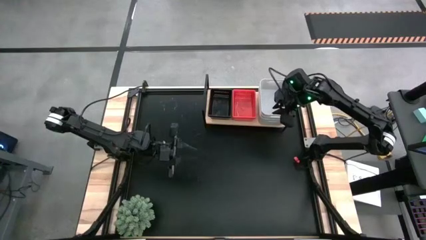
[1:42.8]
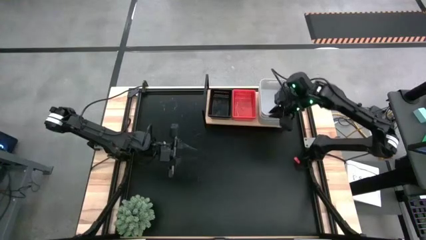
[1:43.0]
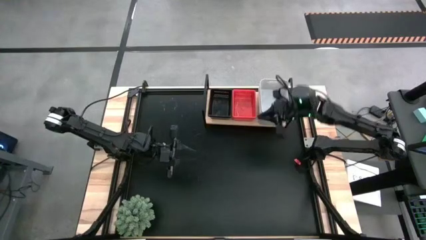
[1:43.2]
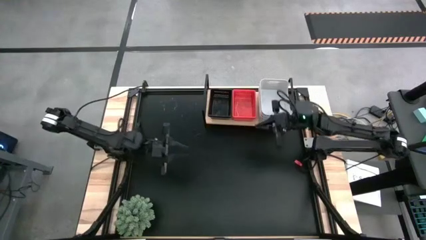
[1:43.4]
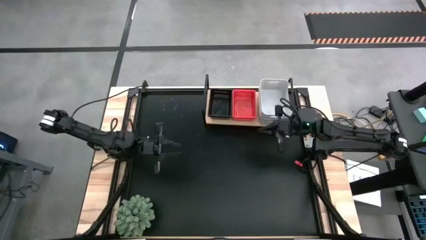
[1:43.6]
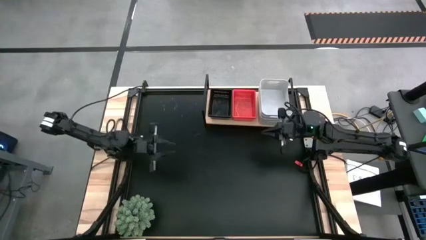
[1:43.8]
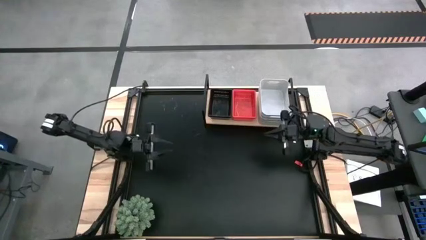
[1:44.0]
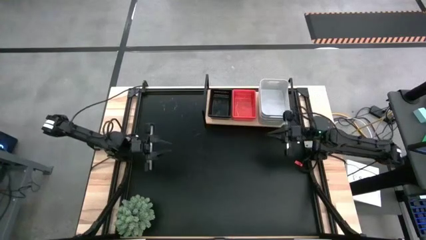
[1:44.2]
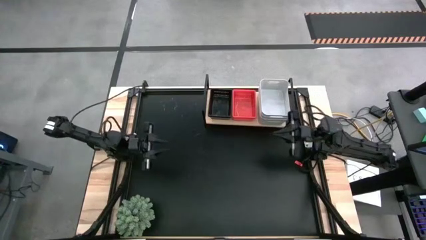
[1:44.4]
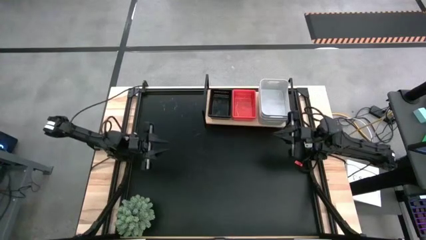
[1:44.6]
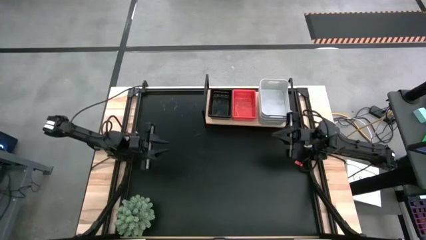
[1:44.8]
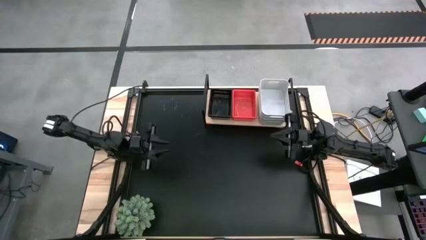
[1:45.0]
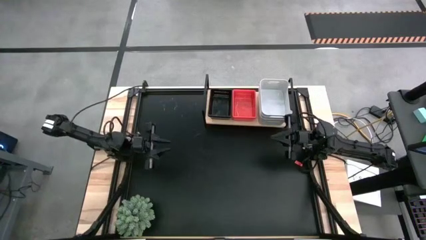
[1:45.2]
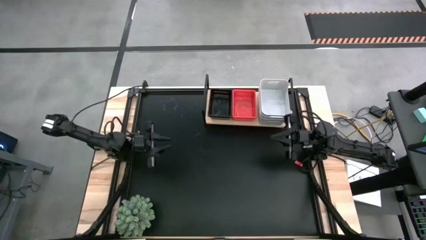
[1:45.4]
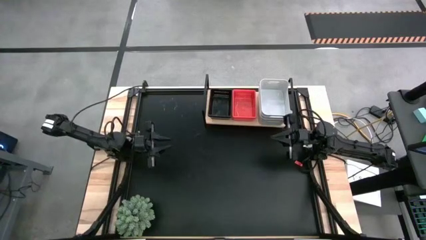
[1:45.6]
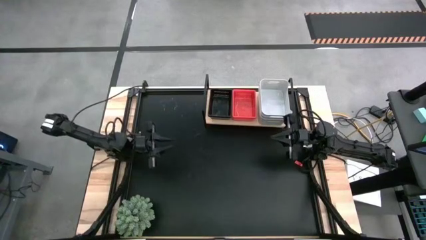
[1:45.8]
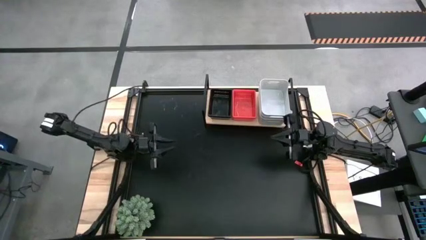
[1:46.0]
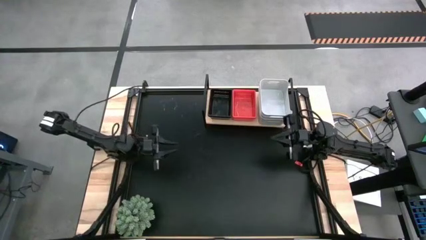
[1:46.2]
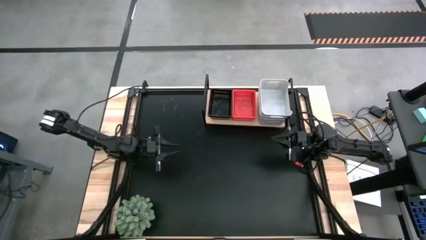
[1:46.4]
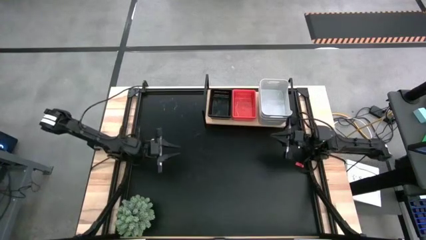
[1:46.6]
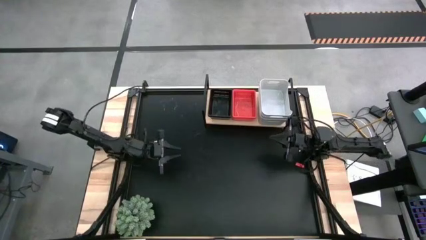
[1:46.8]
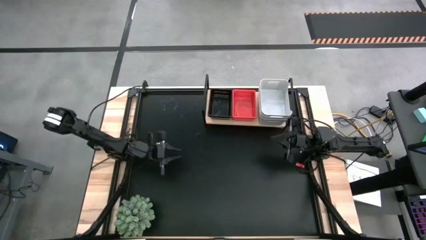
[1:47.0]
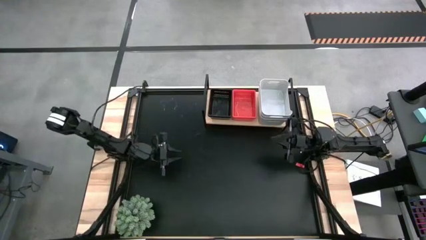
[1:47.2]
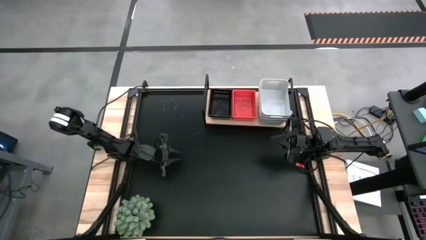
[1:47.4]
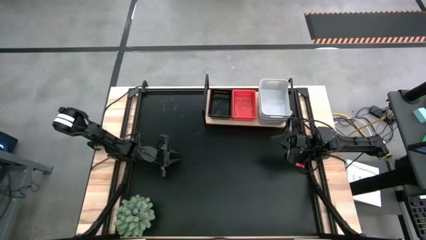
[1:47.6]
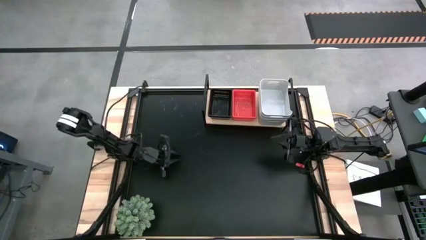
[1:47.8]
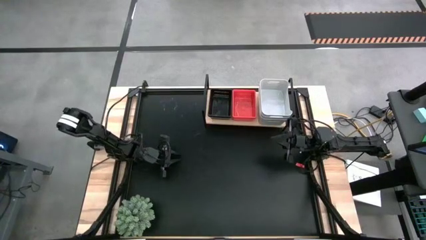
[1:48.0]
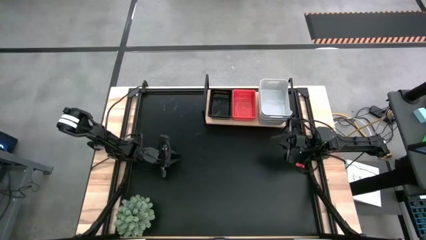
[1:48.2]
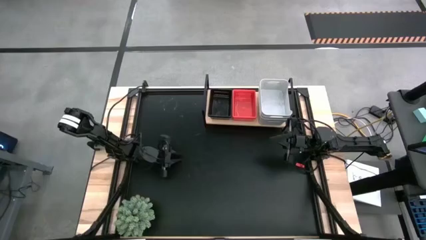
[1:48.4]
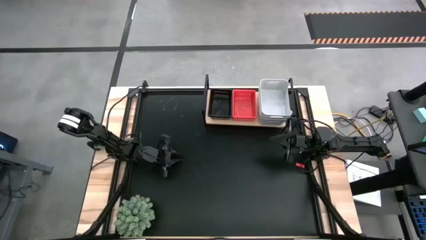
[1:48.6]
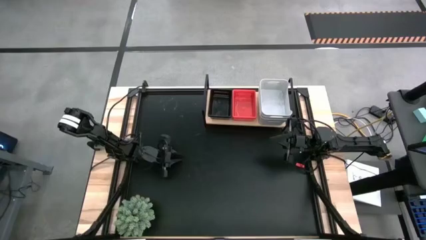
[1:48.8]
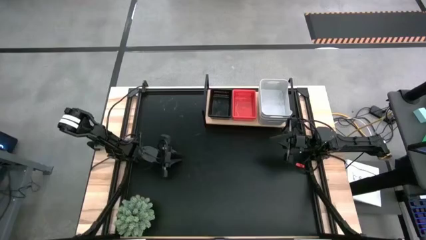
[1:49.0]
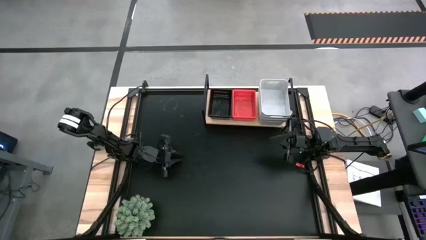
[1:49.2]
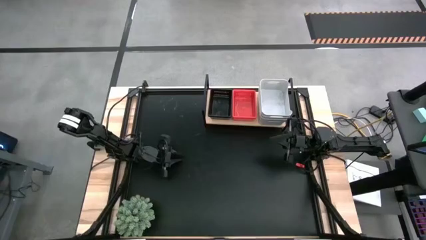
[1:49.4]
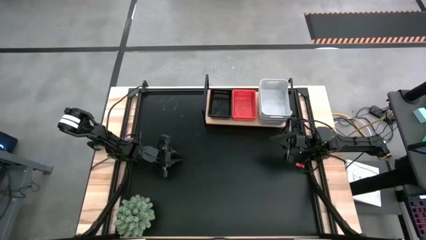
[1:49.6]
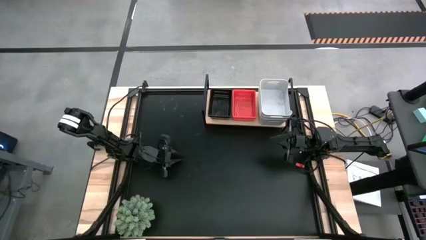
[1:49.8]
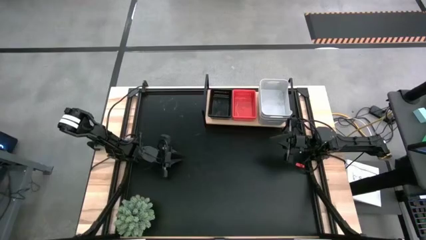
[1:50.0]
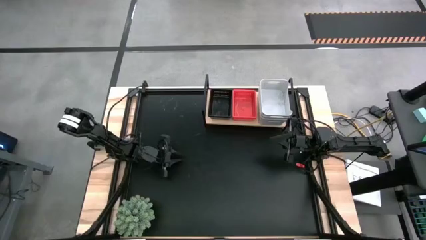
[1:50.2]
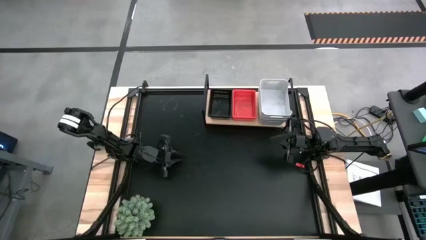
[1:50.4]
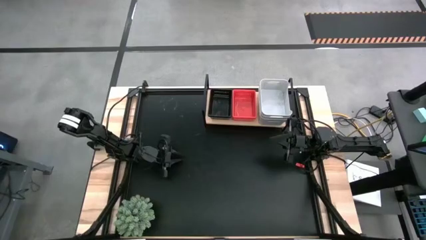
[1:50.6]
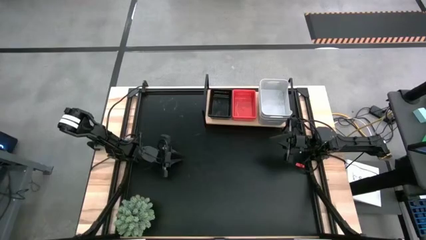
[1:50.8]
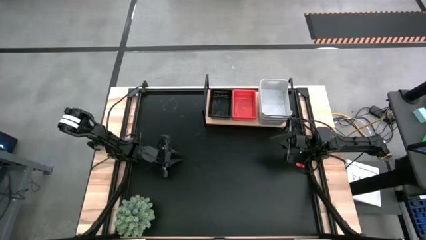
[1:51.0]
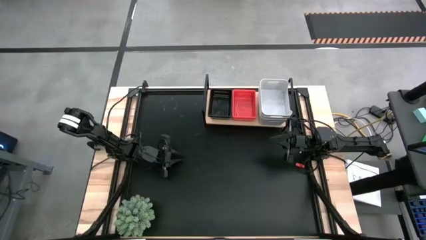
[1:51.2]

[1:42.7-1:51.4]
Task: Stack baskets on shelf by color
Return to Home Position

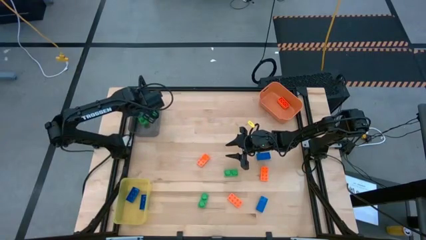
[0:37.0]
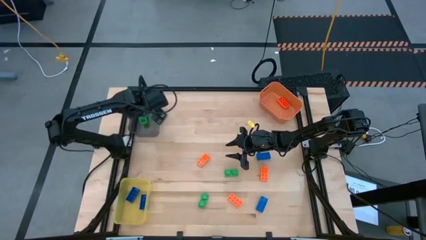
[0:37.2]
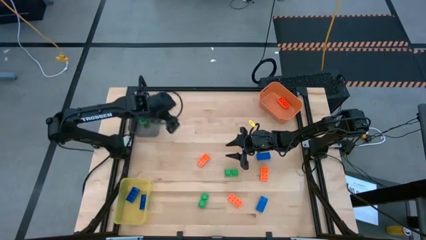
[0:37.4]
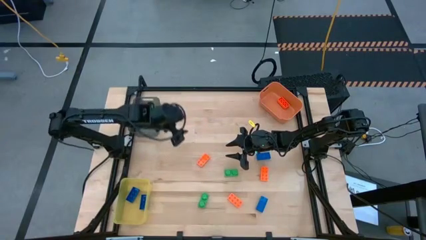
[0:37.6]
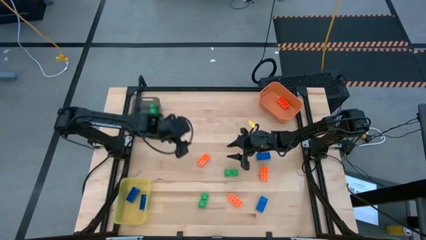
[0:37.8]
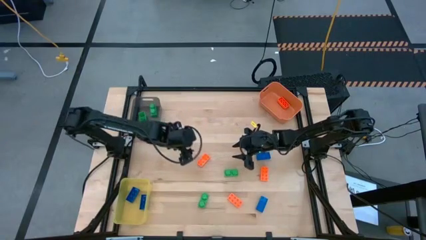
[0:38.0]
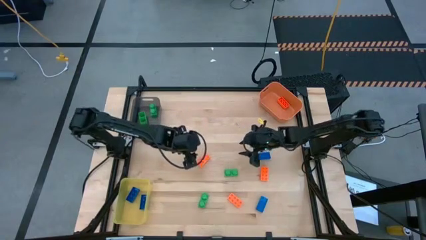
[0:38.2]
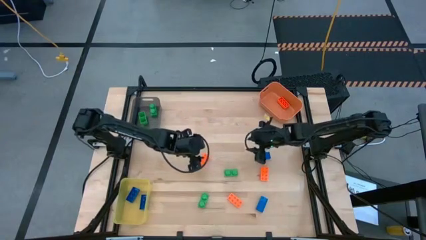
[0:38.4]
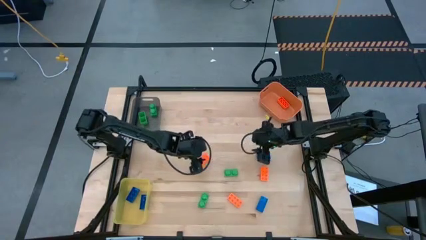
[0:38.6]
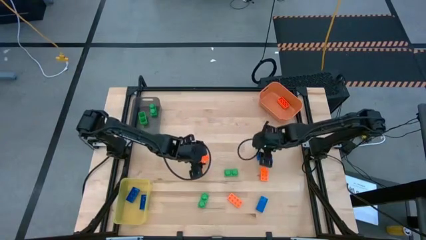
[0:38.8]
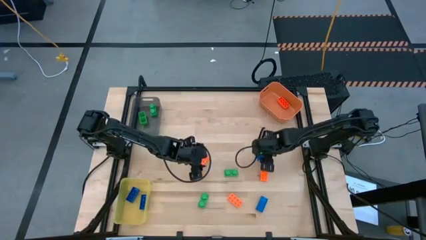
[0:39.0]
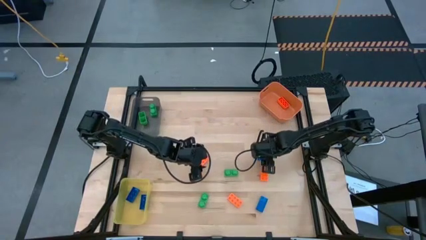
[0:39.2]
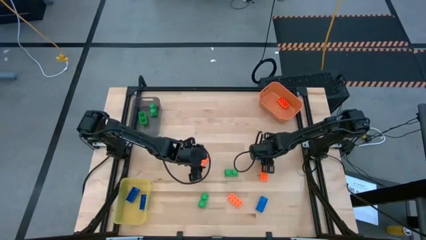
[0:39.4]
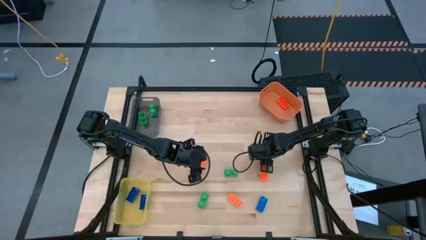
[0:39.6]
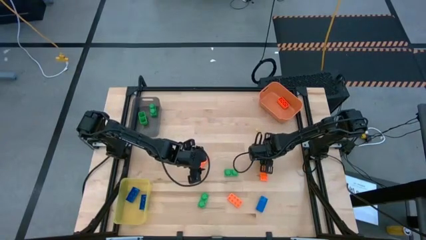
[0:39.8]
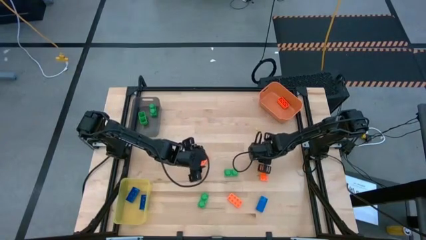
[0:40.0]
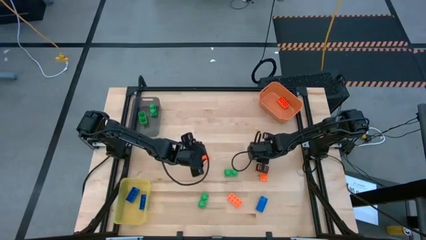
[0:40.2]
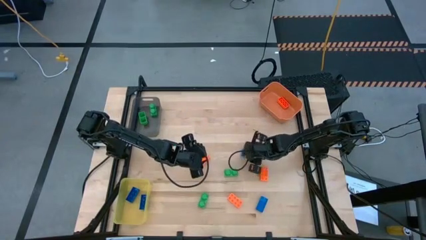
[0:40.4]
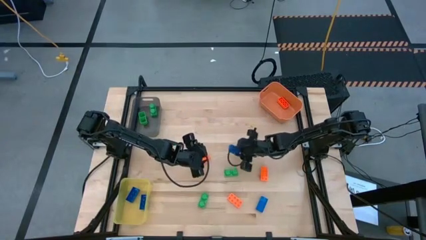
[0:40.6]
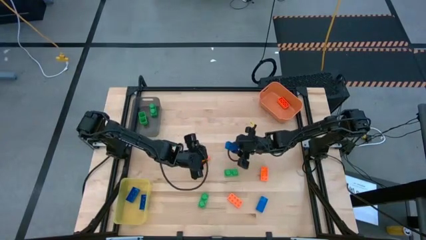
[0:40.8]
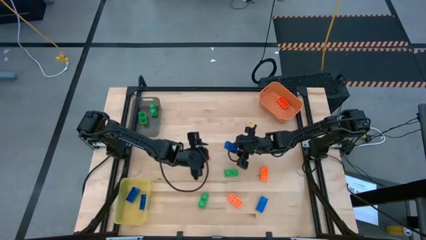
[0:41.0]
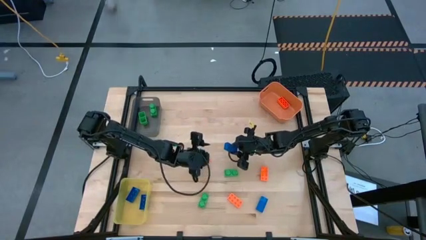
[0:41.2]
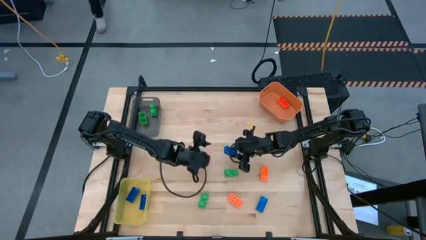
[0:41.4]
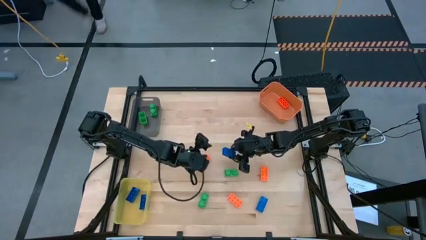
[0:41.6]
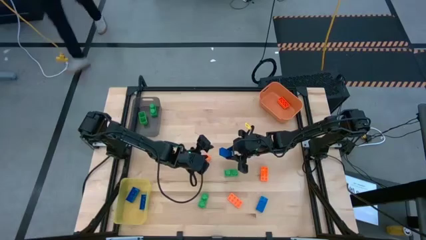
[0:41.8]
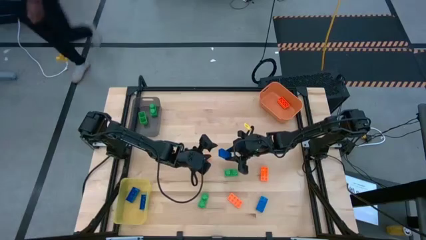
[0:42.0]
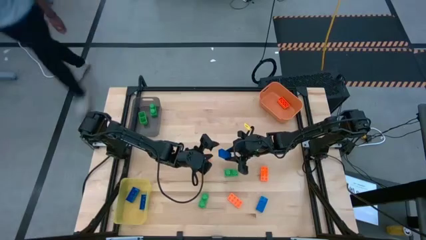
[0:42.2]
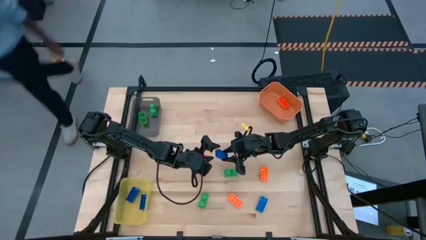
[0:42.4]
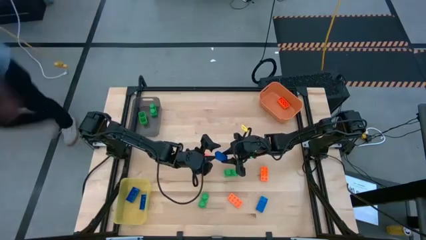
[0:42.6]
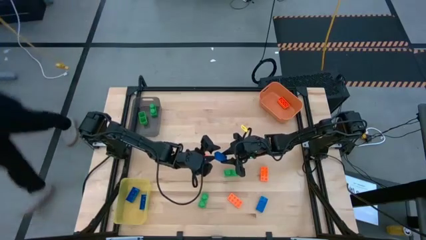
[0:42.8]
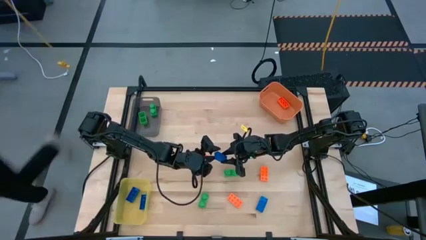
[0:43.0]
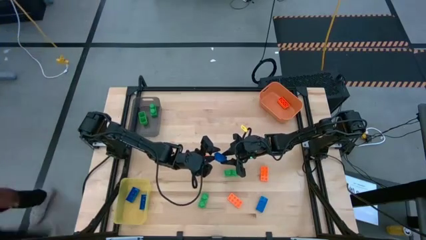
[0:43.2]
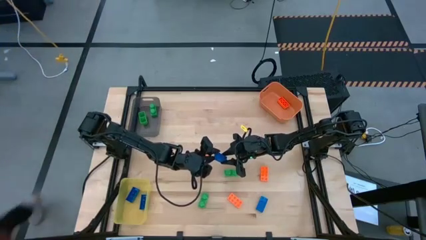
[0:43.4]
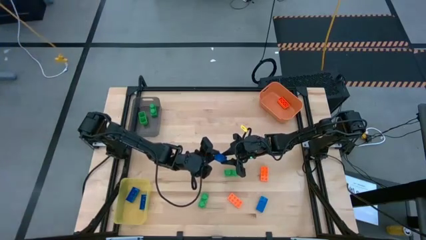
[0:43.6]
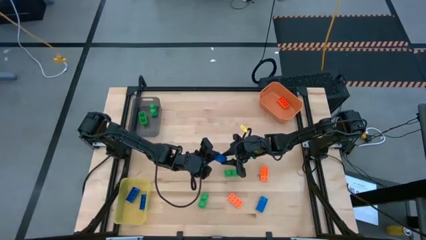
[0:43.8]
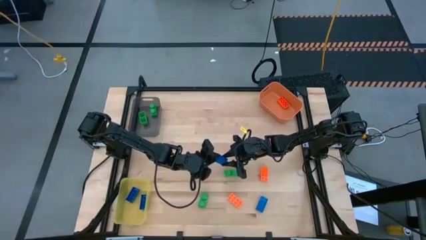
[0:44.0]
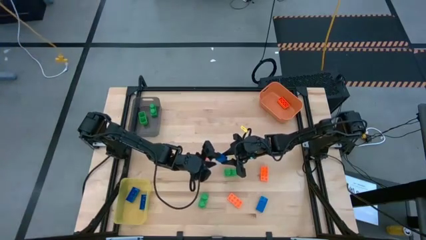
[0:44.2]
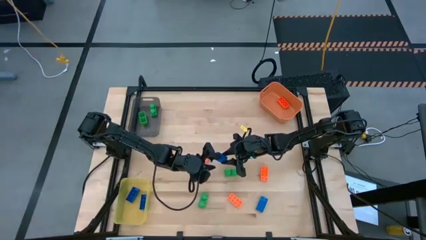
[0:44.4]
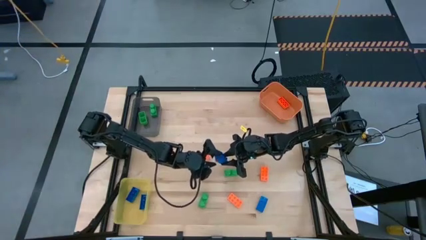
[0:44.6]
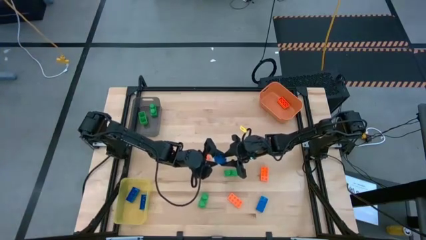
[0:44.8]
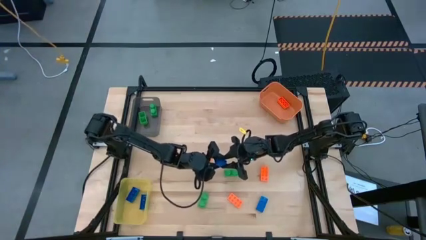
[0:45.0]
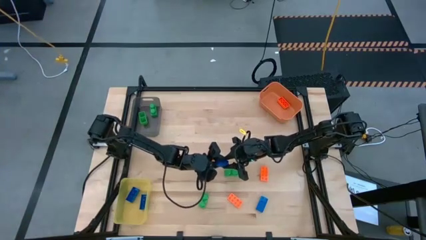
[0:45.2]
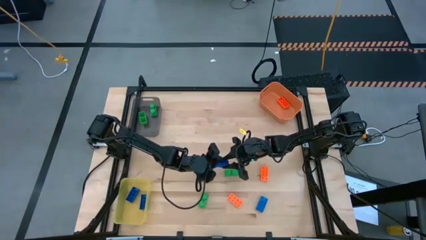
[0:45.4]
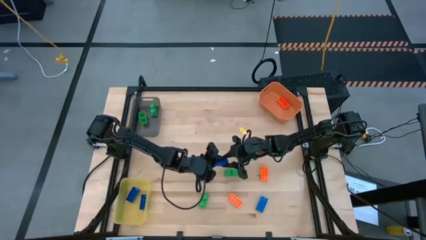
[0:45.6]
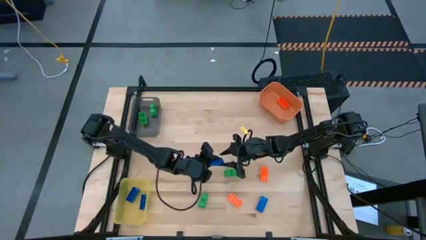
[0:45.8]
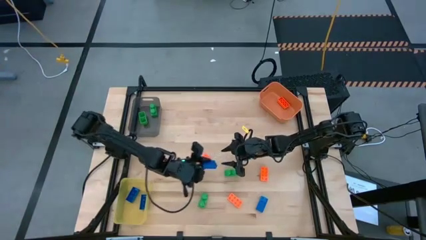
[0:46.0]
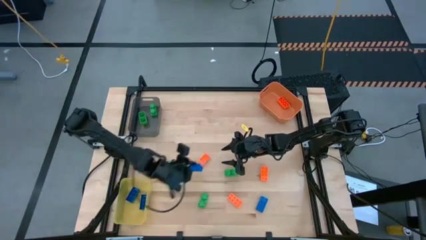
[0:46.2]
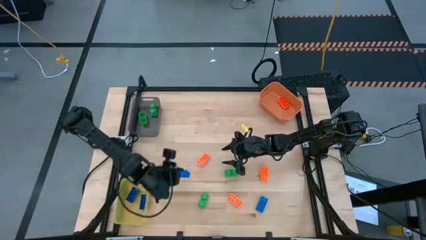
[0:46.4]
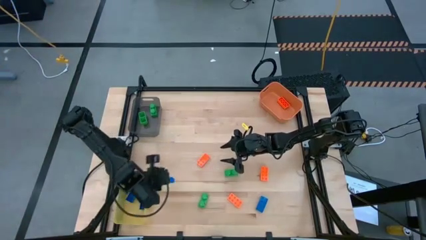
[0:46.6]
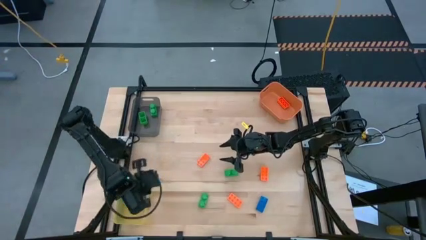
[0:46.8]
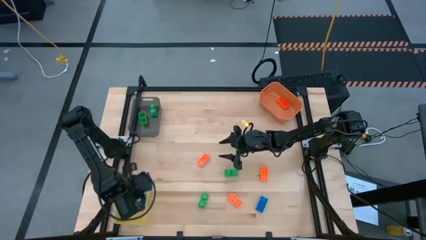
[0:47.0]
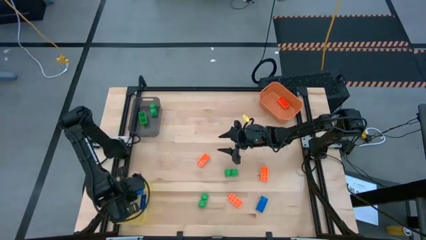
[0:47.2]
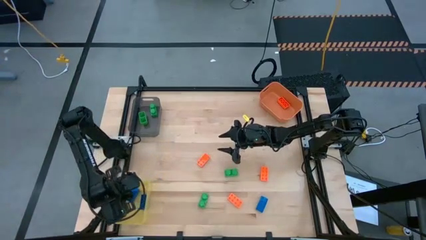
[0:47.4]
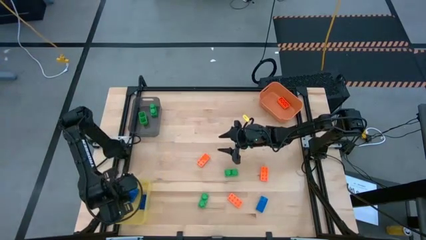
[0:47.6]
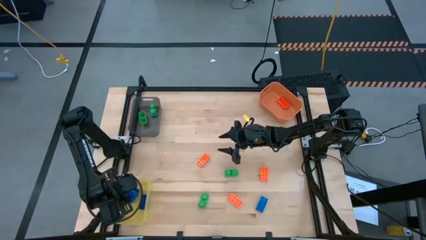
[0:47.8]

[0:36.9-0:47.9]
Task: Sort & place blocks by color
Put the blue game piece into the yellow bin
